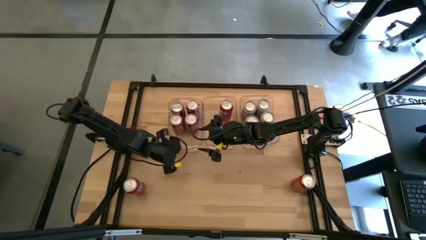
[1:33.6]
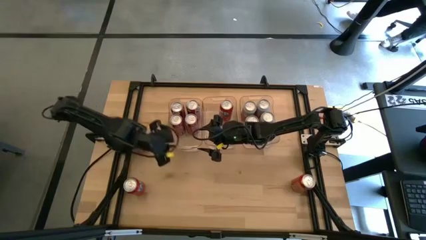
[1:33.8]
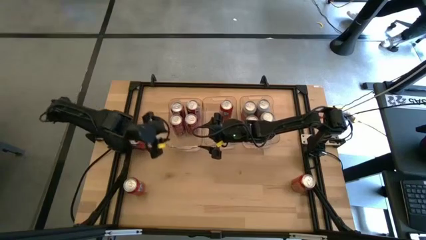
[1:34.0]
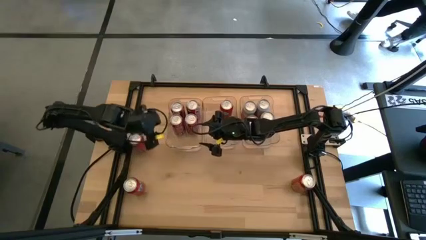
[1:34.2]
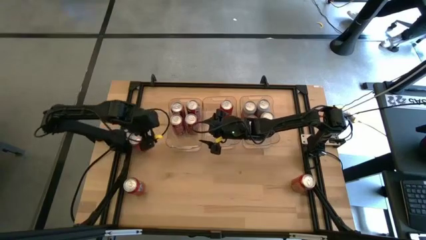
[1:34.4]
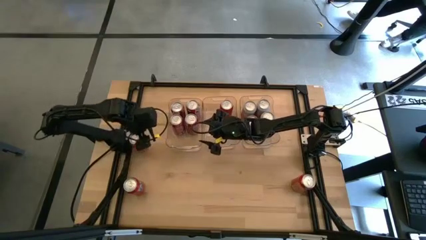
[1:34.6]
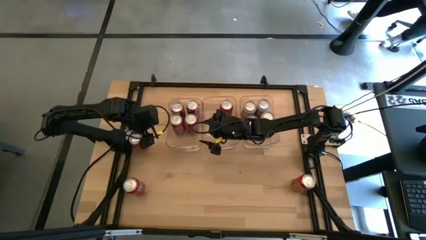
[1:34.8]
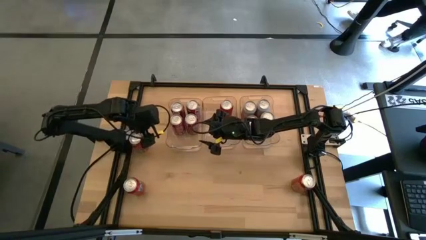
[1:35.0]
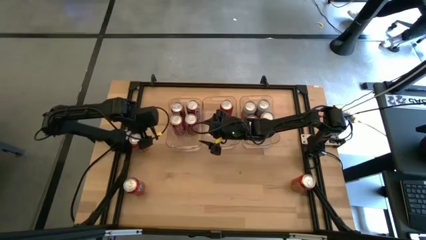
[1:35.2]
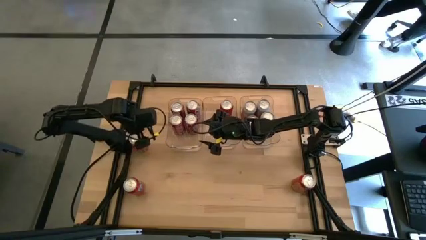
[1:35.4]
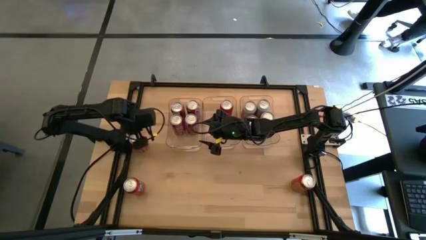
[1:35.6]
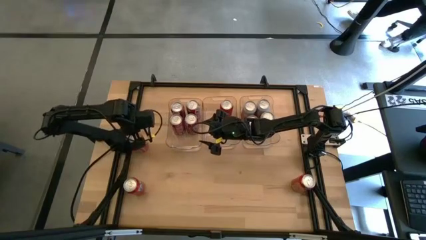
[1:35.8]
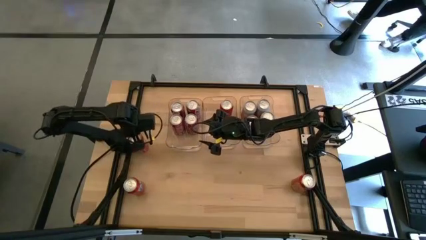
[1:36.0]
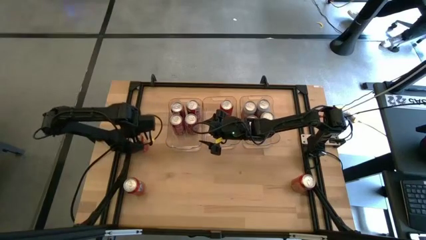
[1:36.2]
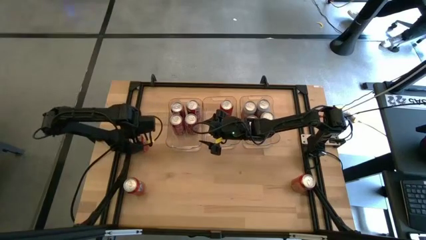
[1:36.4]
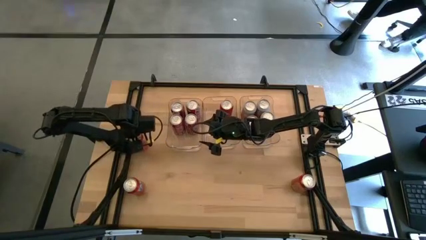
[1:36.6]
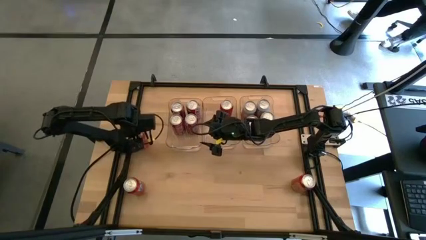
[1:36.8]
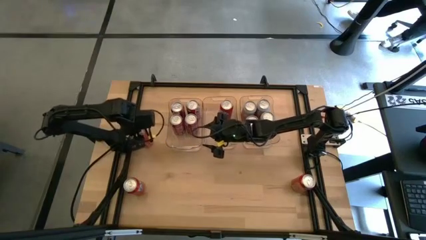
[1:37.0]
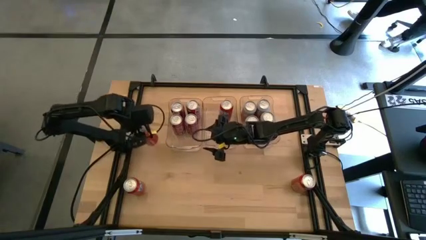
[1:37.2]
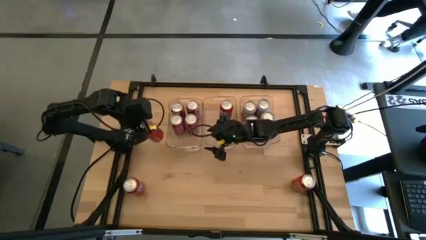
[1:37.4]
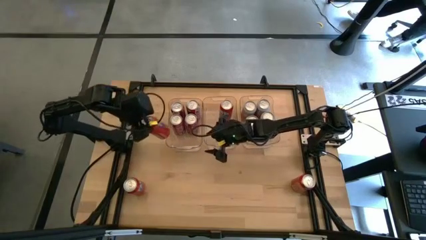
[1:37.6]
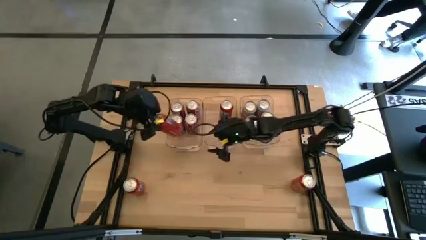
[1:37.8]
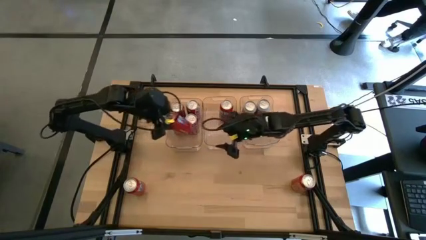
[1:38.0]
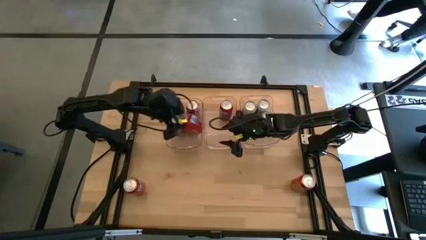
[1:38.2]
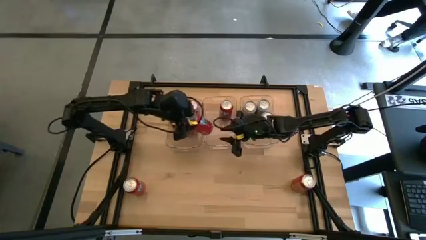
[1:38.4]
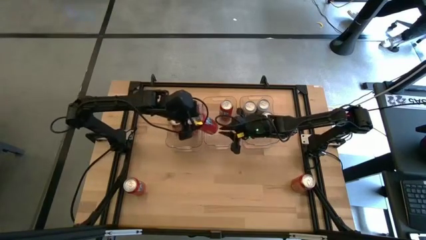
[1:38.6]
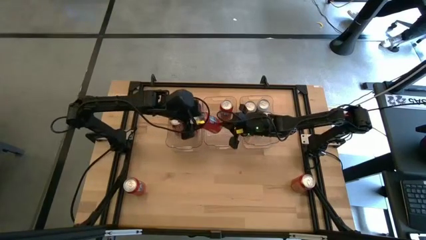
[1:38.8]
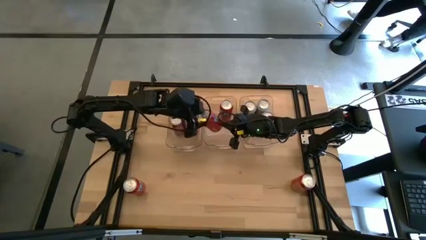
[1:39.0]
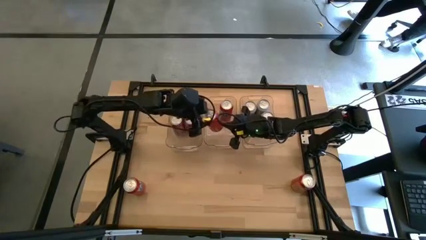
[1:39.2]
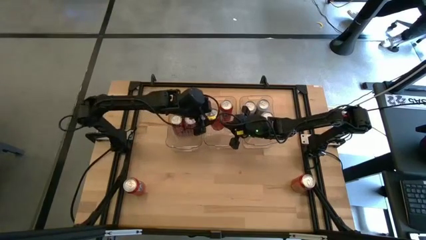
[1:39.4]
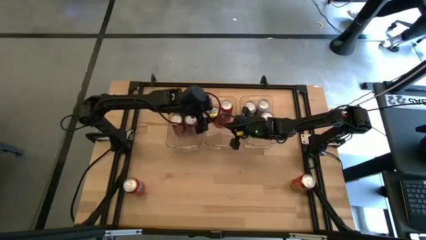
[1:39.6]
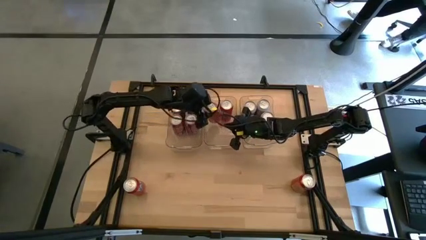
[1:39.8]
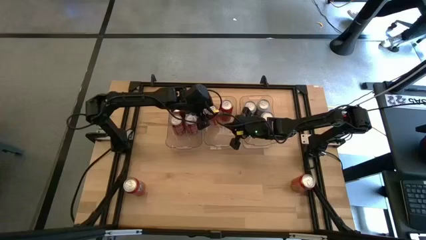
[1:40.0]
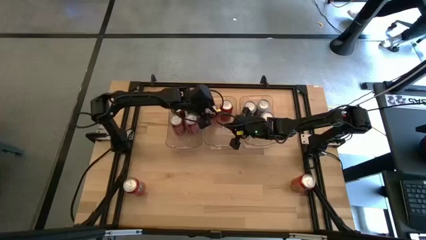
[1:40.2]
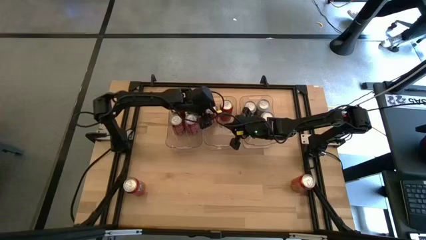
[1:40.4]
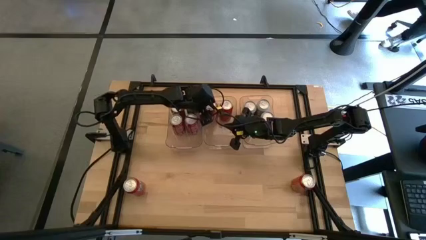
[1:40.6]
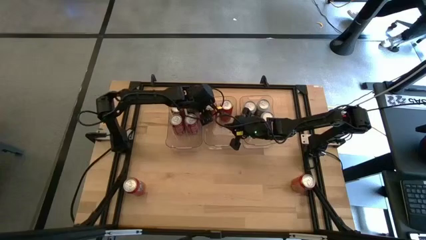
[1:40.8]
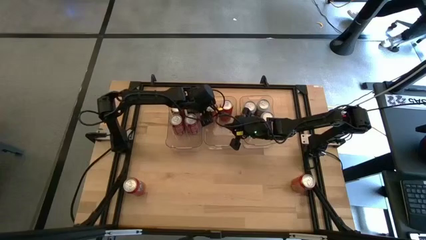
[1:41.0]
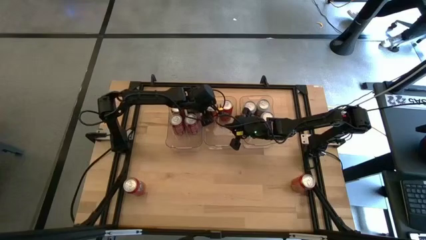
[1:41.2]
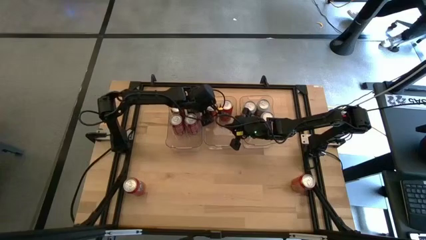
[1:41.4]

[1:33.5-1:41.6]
Task: Sort soda cans
Put the top orange soda can into the middle transparent bin

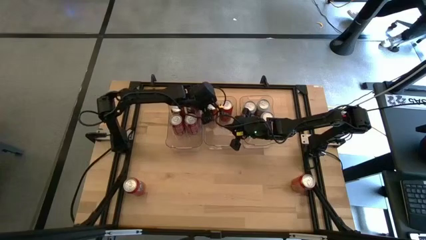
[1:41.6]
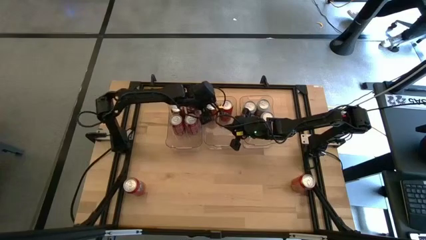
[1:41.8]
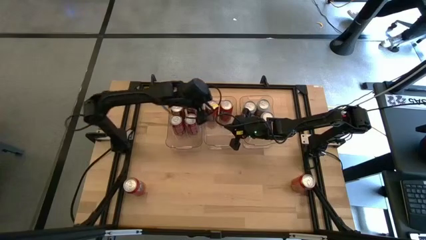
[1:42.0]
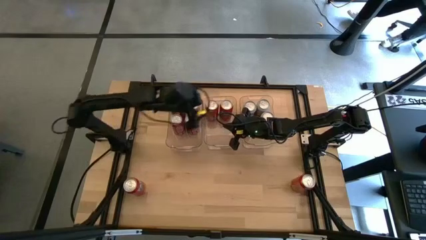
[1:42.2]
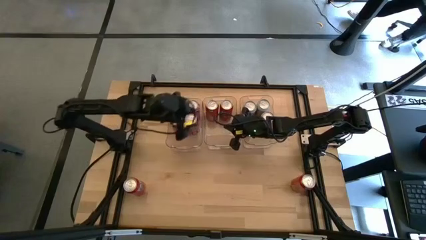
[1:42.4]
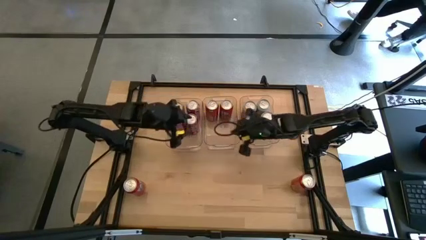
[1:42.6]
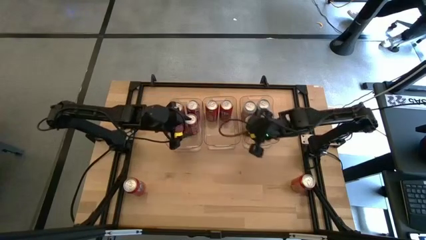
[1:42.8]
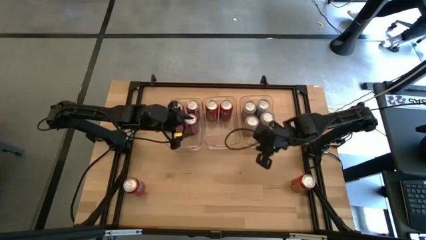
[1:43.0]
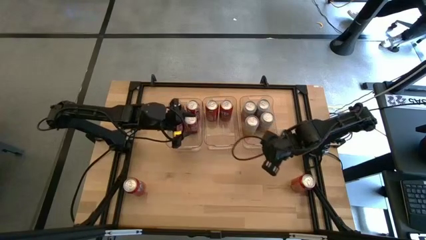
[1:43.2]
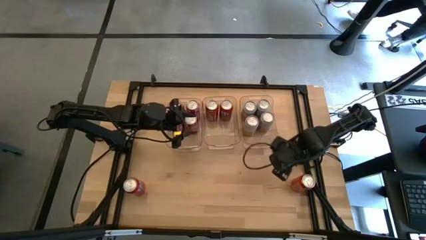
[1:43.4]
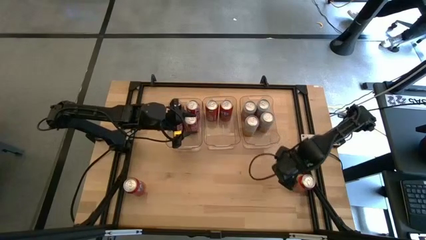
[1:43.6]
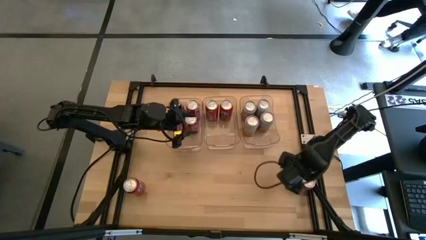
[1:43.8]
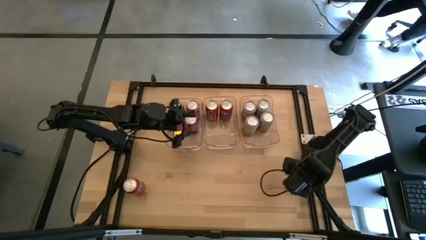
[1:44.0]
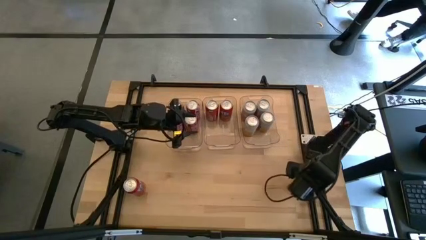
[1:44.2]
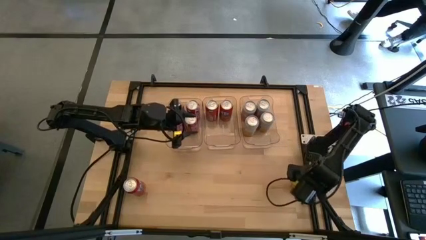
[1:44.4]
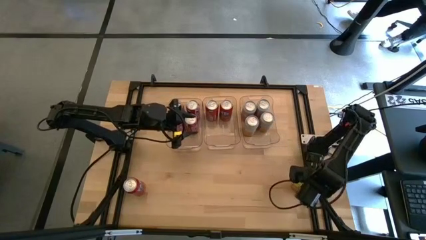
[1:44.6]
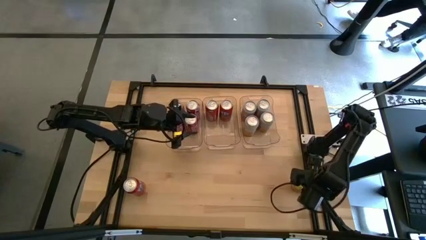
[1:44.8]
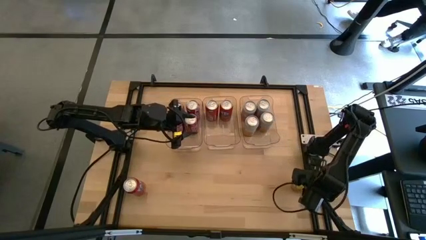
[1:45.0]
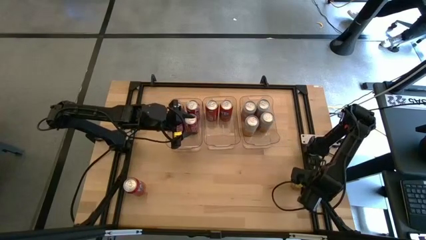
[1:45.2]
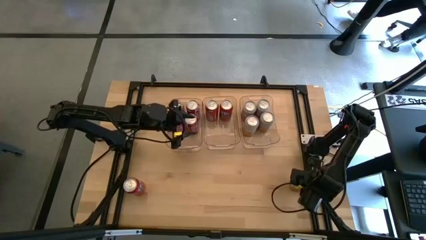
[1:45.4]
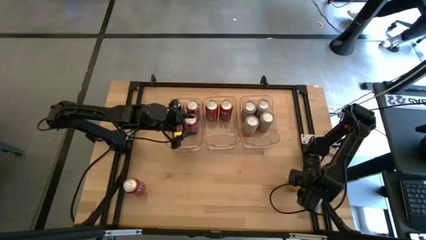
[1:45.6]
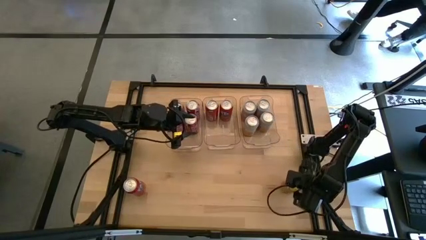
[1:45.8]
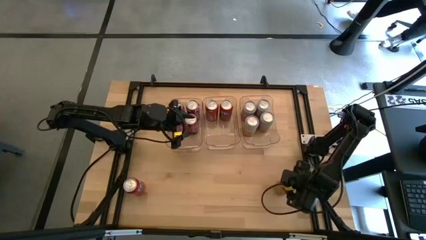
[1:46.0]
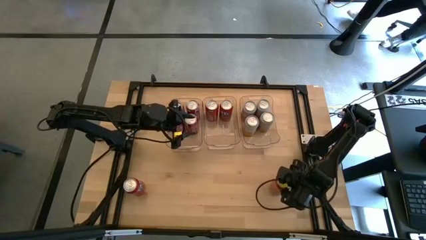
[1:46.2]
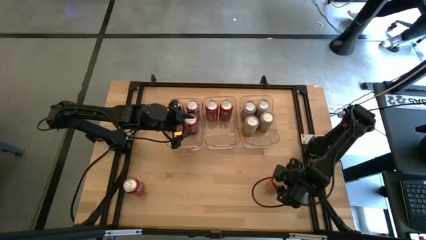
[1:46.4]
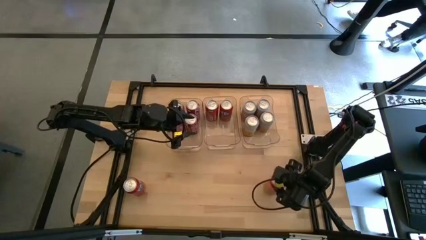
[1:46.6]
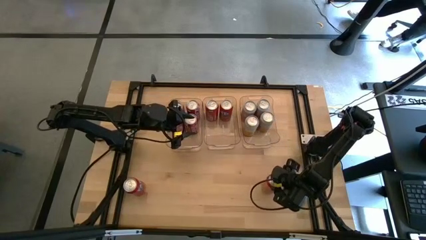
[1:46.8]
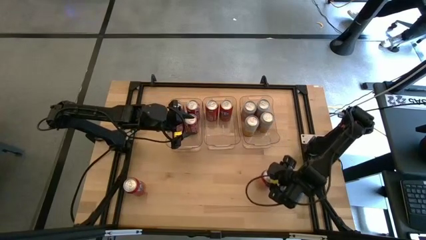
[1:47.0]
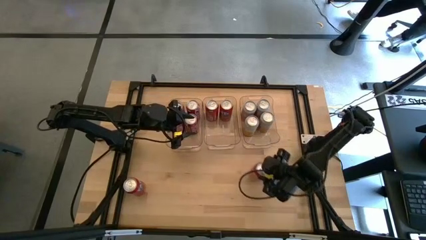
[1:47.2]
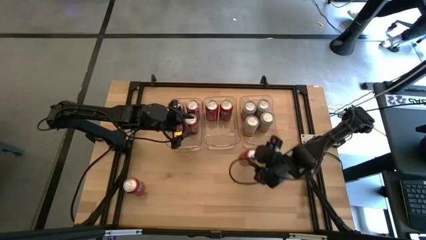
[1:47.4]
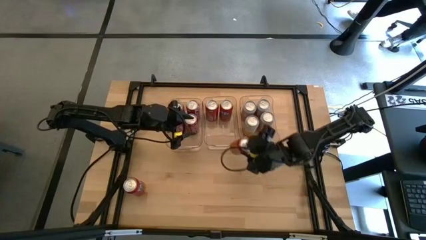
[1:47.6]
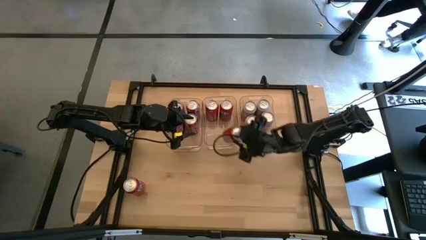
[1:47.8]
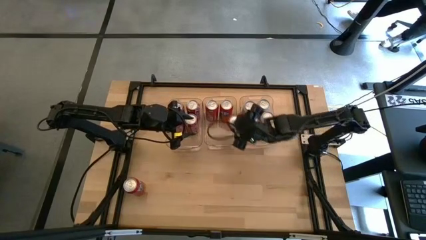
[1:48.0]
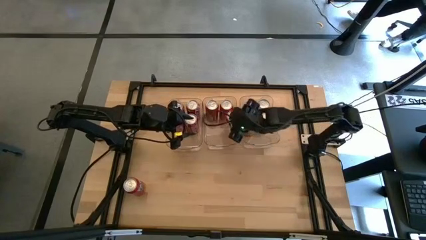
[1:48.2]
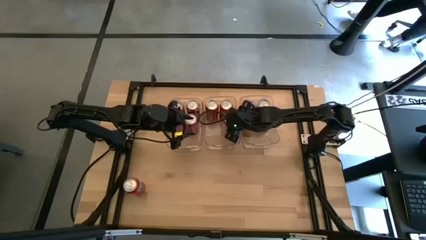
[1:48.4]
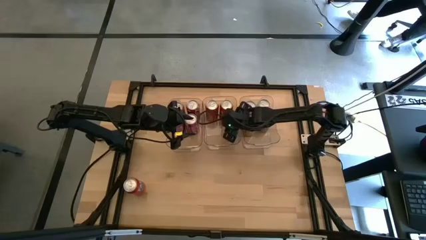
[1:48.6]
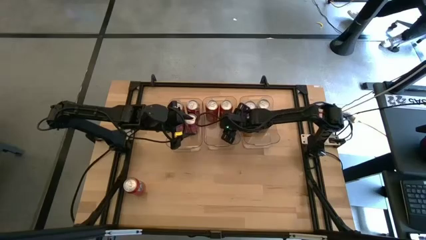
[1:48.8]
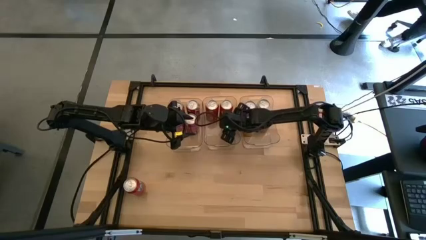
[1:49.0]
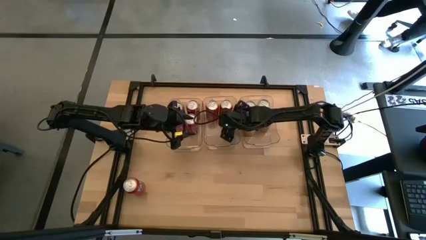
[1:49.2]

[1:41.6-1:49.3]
Put the right orange soda can into the middle transparent bin

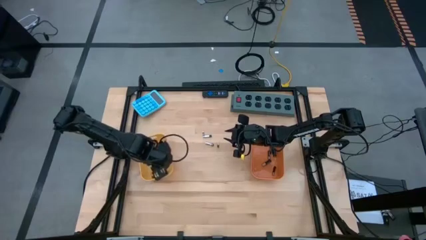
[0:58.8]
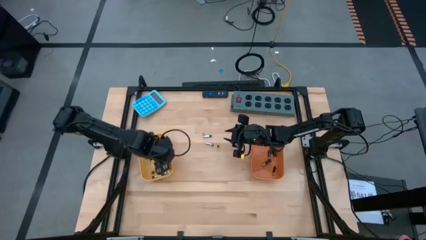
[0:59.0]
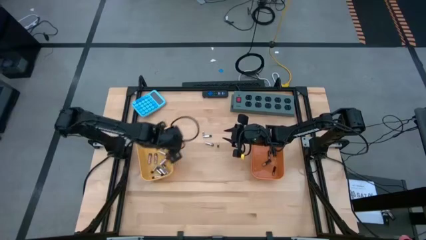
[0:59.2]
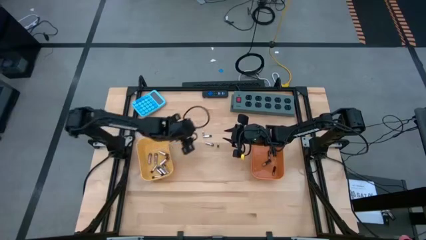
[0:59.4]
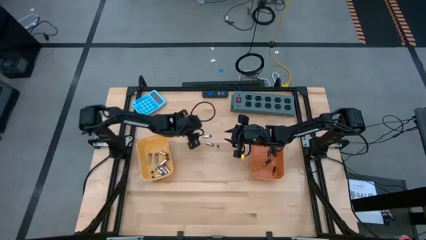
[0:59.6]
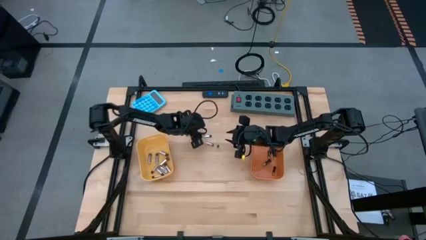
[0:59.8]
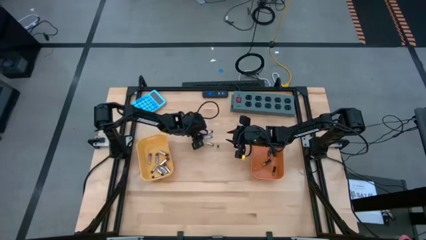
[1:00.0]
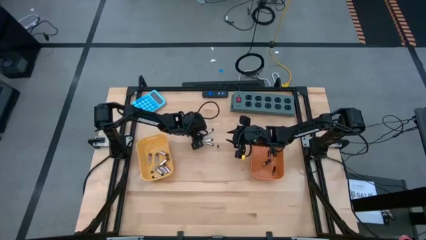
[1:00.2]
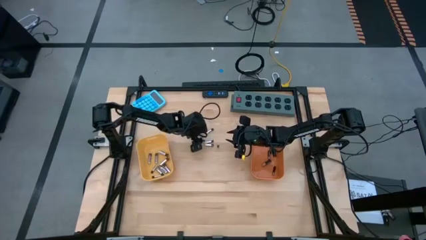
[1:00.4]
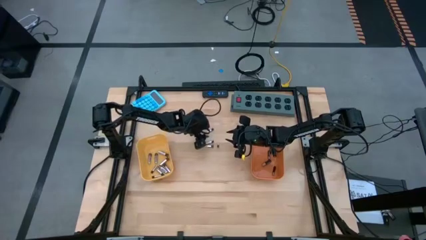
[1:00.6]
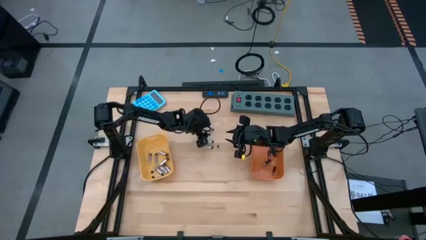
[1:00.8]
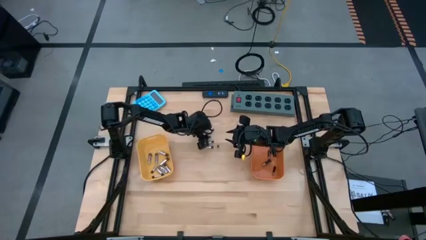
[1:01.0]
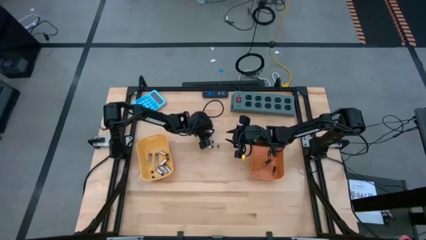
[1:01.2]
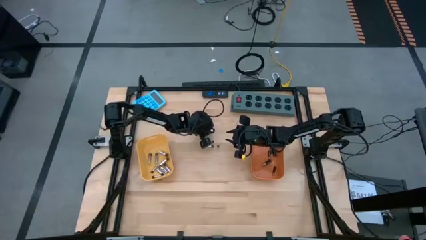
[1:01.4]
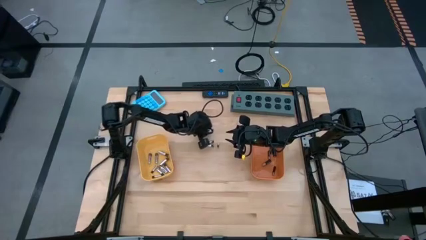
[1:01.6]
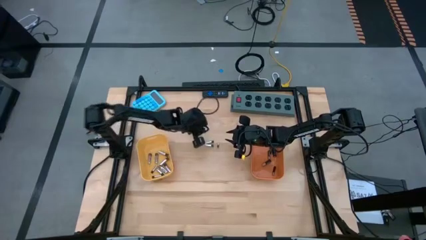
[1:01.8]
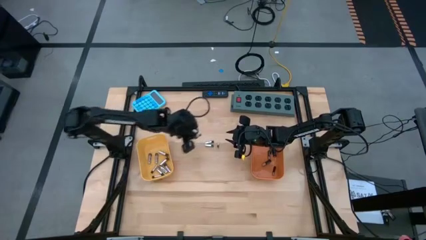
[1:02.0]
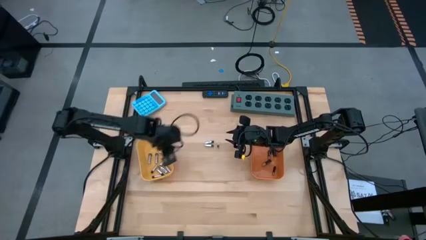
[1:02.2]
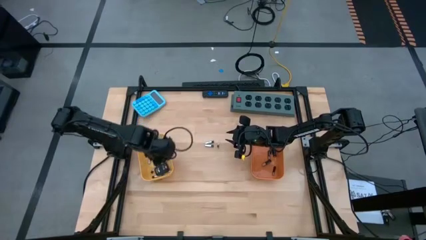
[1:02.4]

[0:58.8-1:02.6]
Task: Sort batteries
Put the silver battery into the yellow bin
